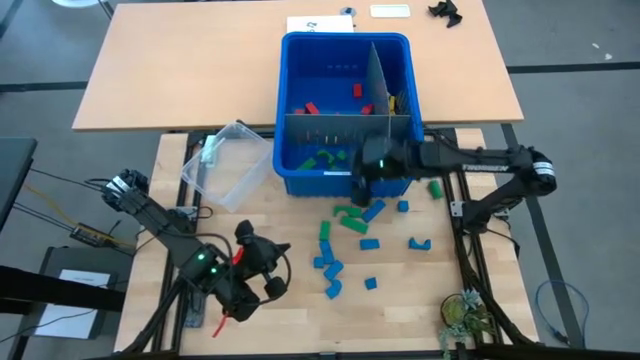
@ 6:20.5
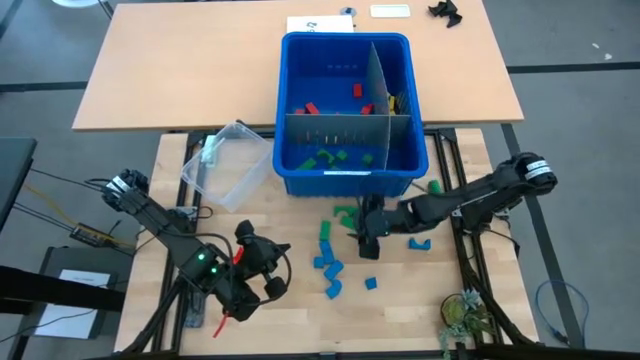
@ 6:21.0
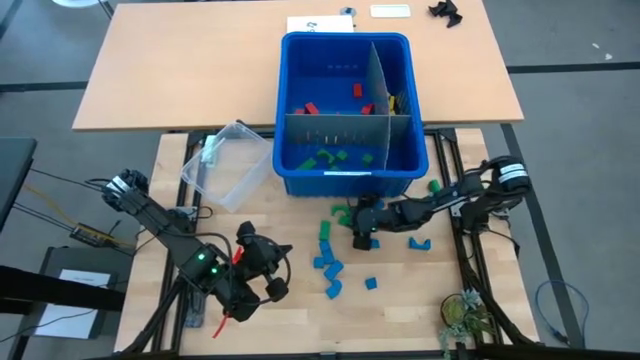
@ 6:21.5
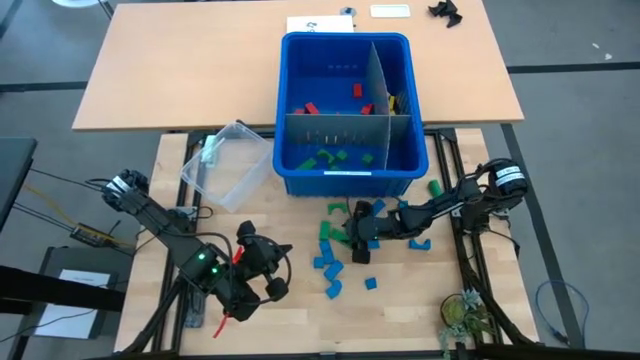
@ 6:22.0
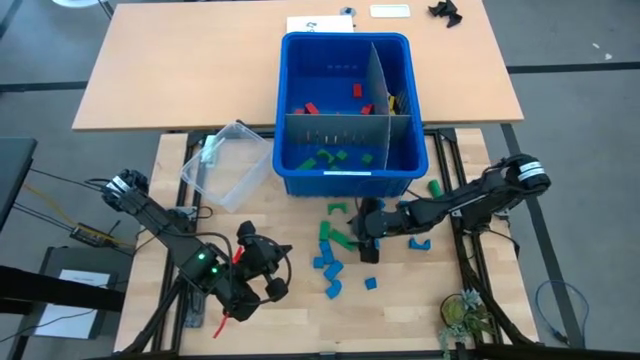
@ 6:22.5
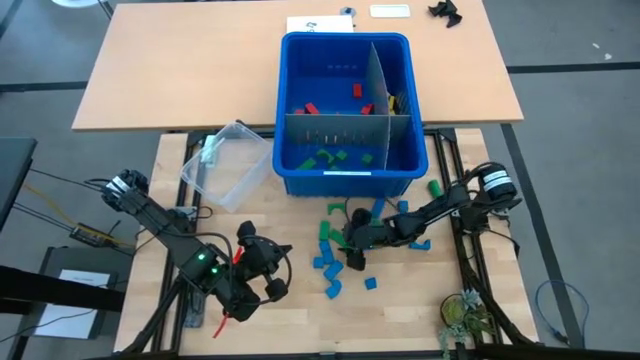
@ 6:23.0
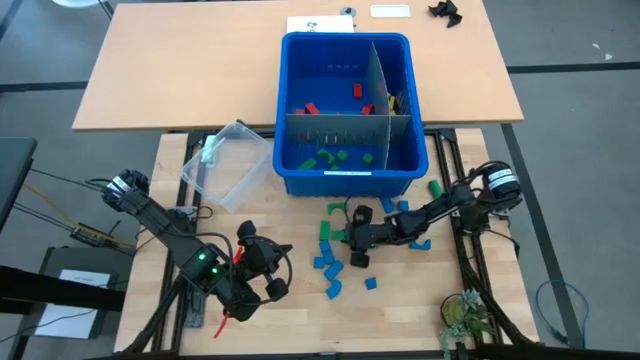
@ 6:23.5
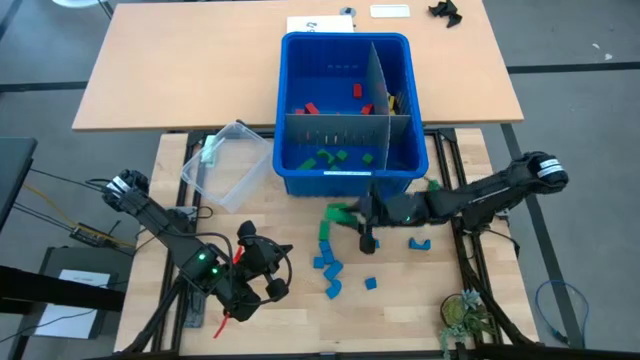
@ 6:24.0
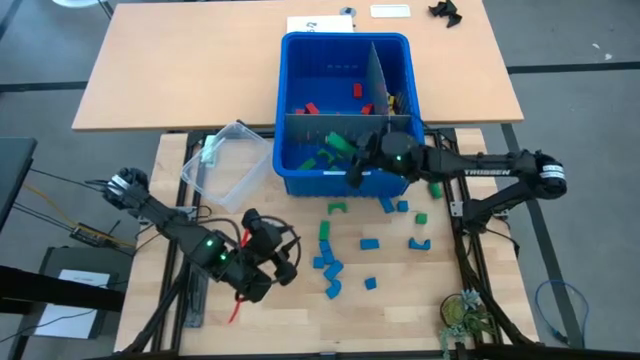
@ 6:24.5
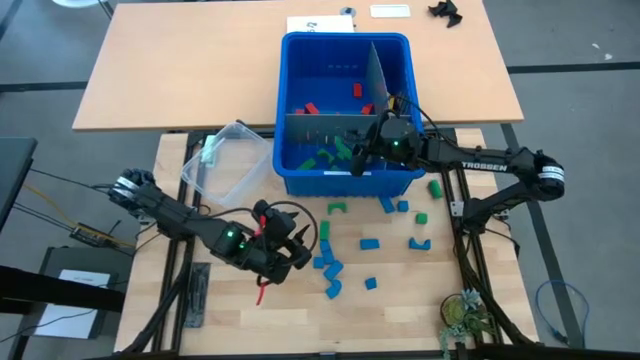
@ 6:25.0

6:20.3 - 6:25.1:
Task: Sort blocks
Put the green block into the blue bin

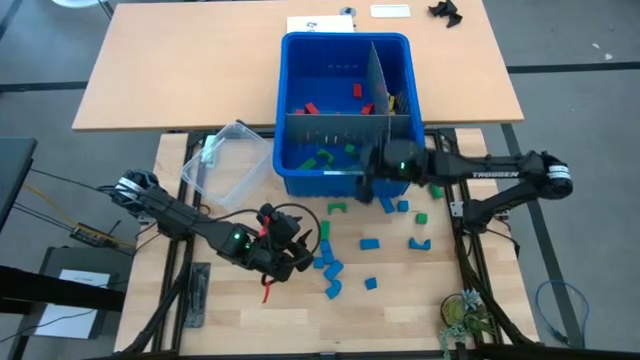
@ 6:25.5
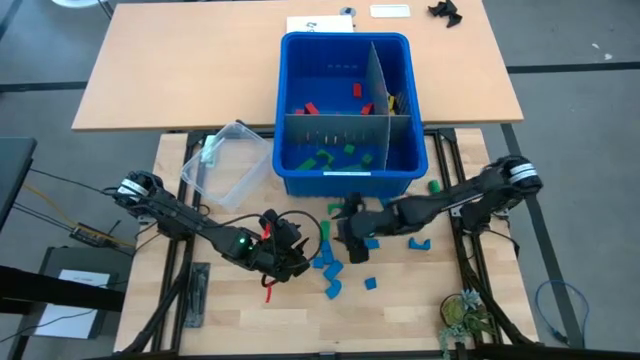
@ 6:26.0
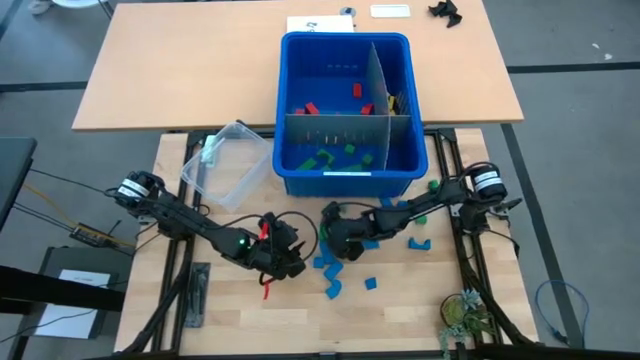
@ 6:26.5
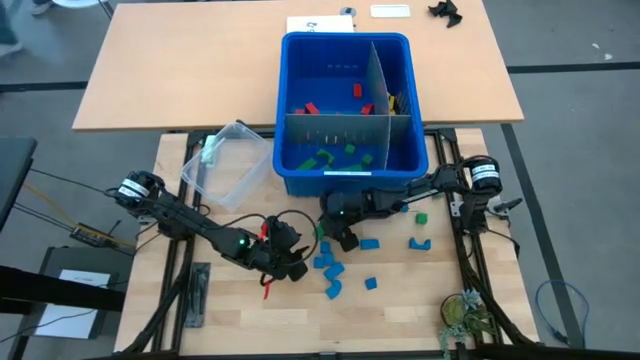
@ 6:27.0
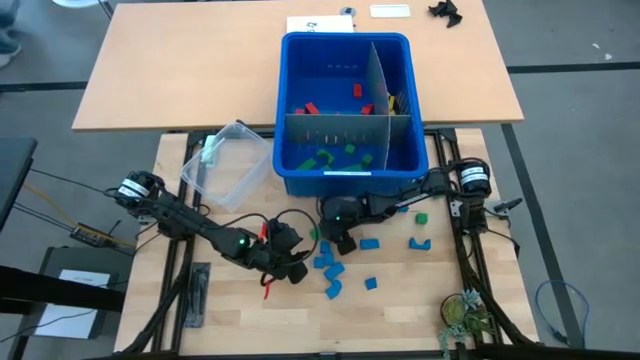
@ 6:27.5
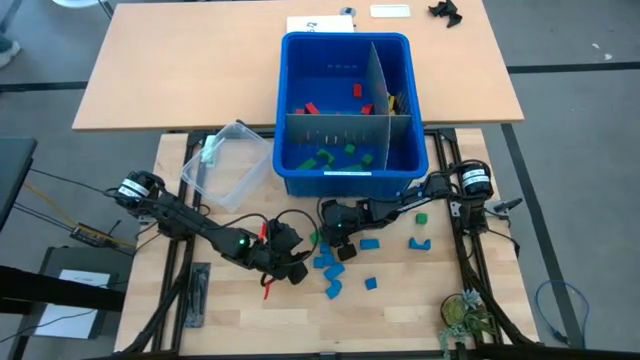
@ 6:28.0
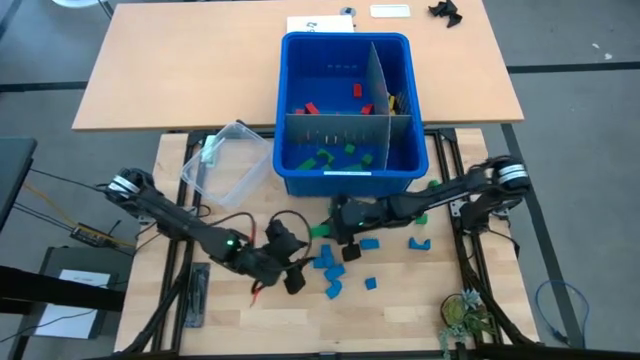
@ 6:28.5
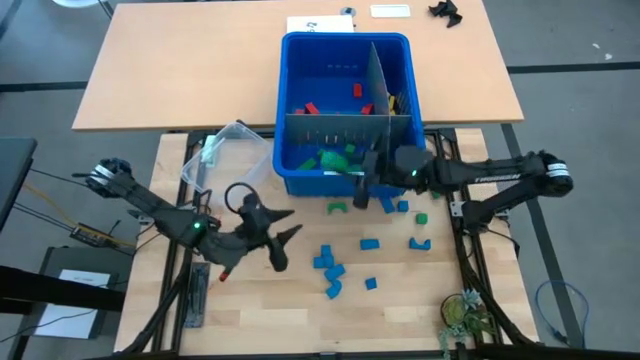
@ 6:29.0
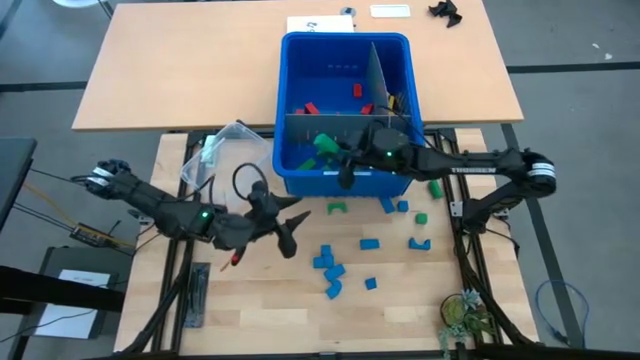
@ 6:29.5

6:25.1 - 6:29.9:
Put the green block into the blue bin

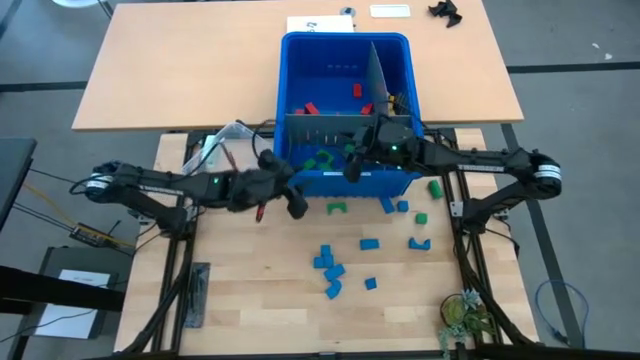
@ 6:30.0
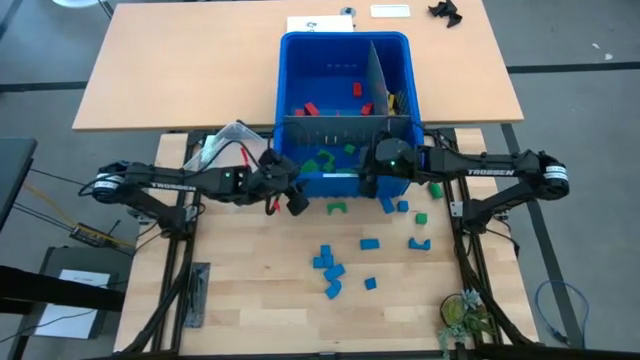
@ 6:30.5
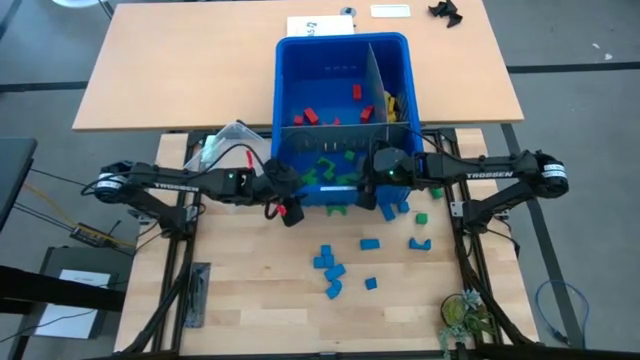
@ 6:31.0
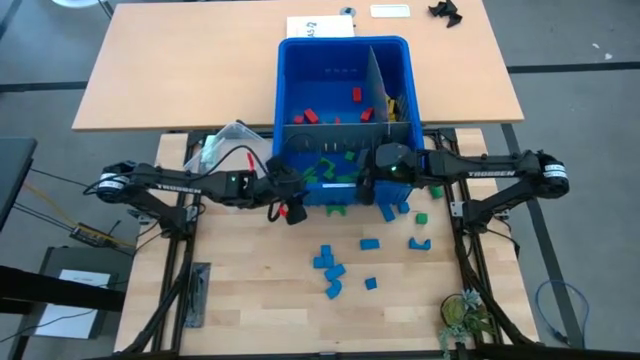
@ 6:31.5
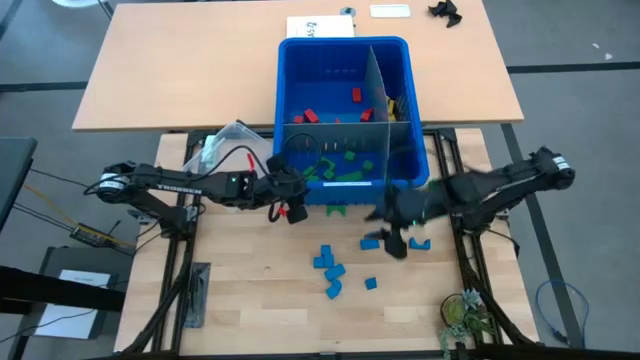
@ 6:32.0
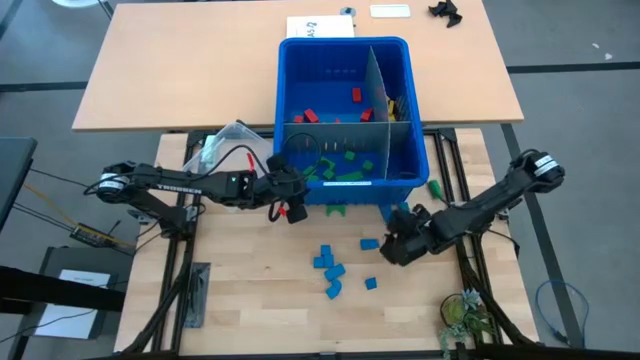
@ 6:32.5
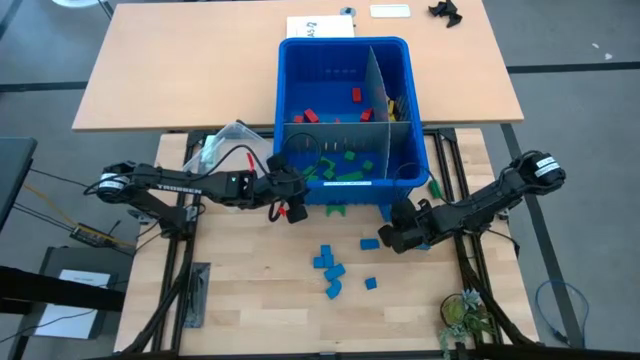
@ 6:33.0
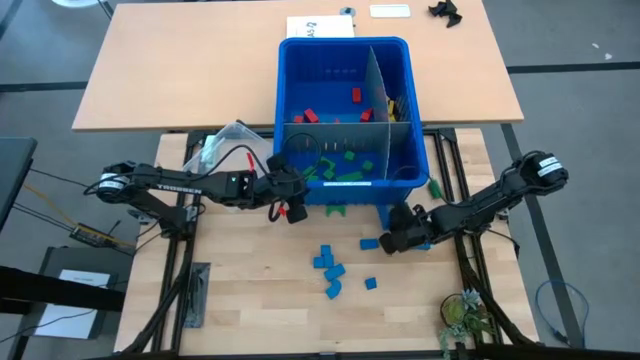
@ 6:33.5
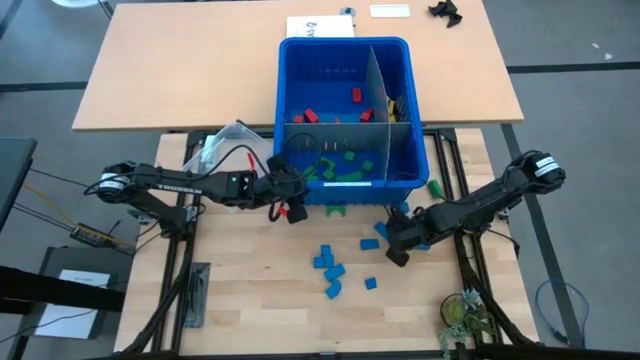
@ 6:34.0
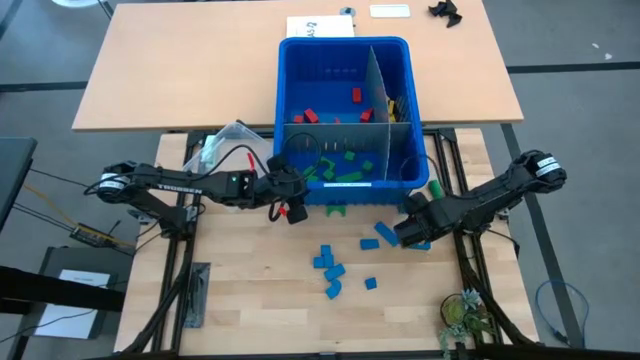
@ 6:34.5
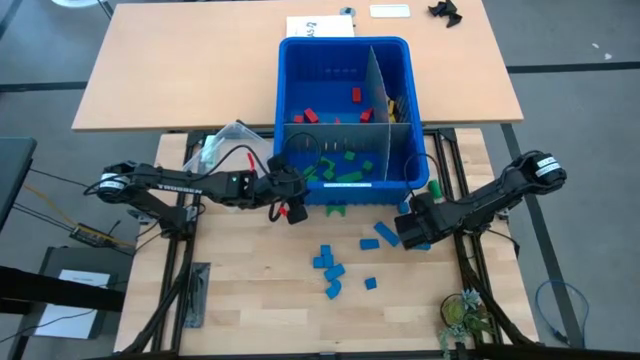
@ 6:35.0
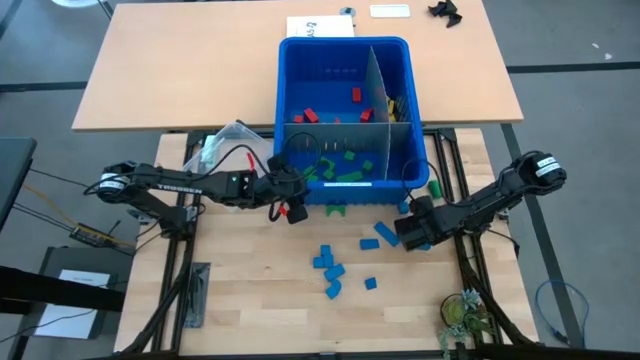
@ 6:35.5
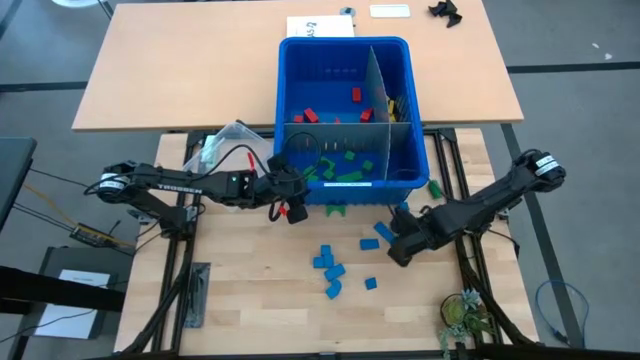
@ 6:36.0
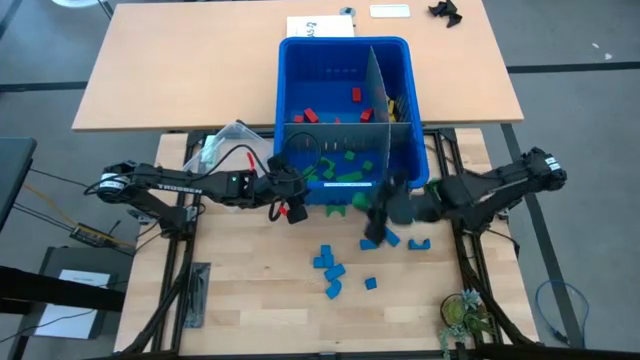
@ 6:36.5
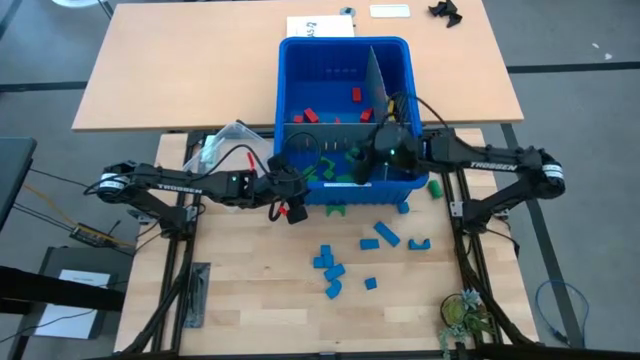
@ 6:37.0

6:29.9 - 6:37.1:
Put the green block into the blue bin

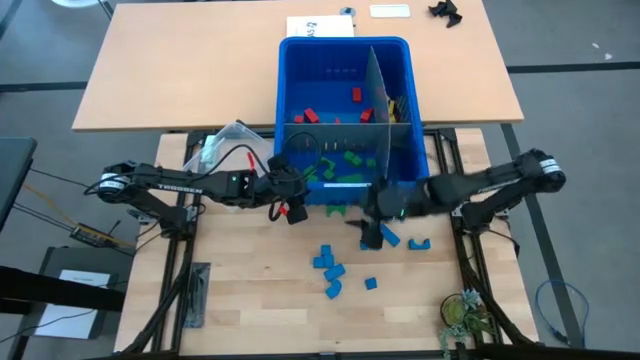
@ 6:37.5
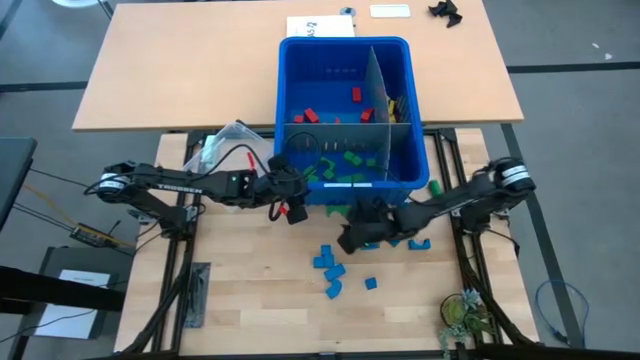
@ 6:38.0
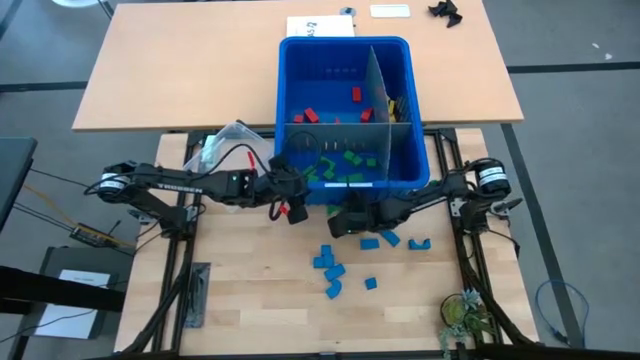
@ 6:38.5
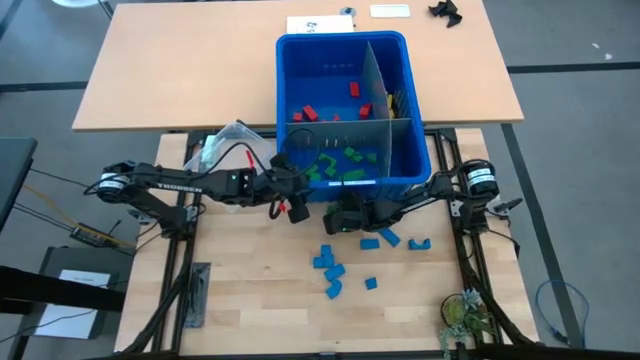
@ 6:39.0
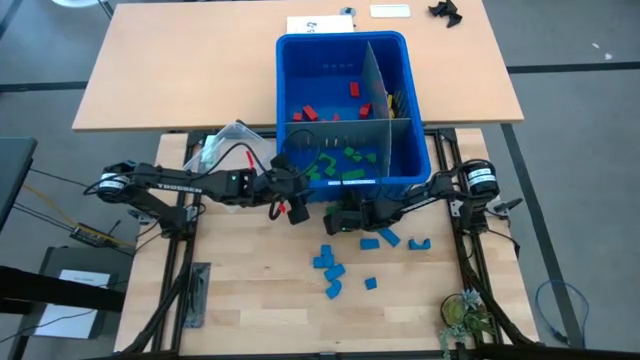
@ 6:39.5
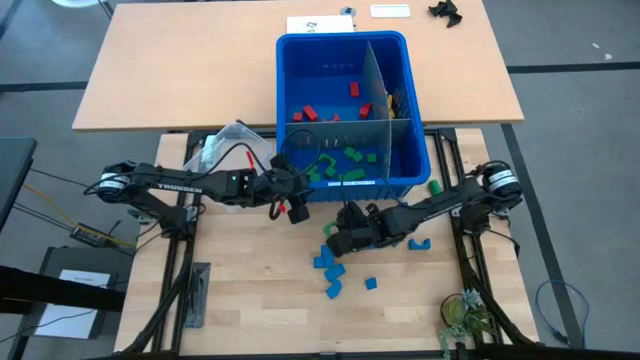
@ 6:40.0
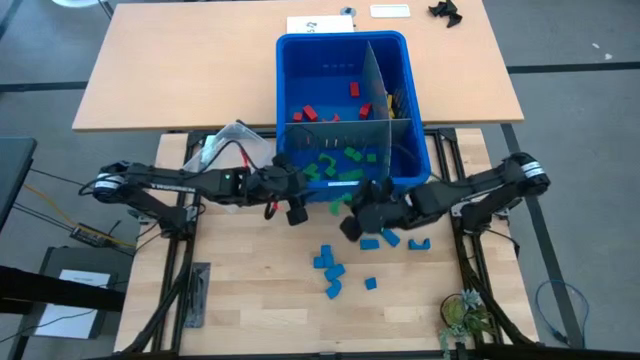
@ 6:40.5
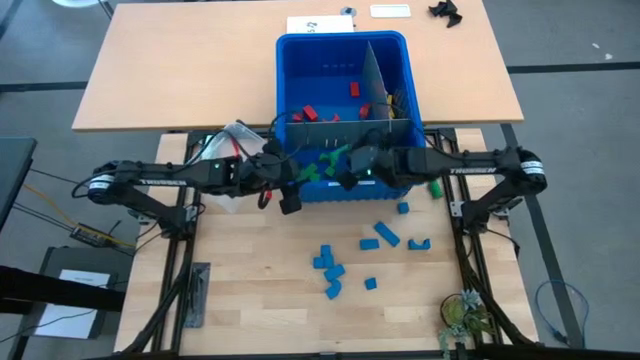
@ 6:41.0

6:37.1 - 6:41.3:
Put the green block into the blue bin
